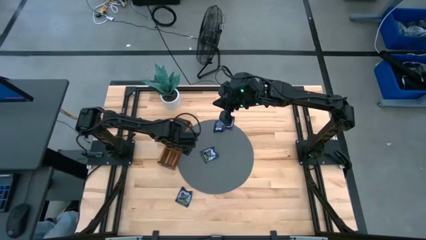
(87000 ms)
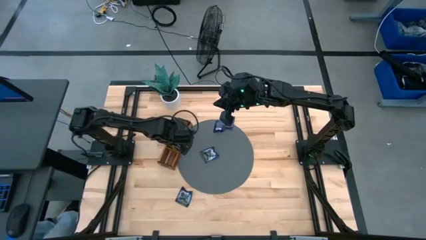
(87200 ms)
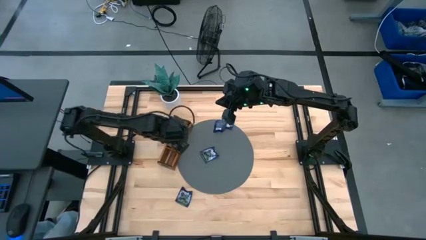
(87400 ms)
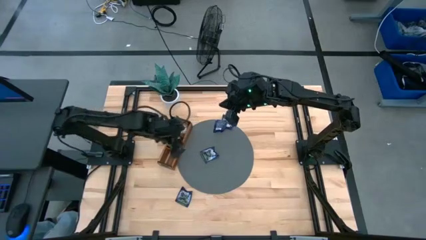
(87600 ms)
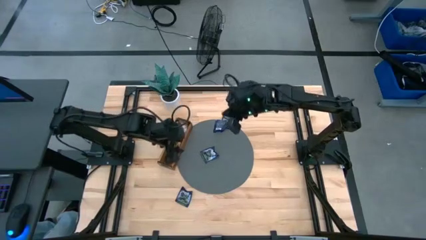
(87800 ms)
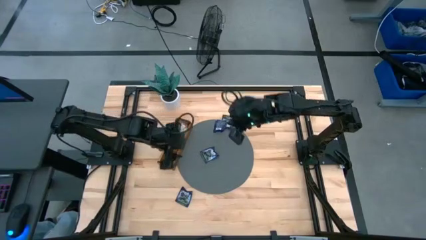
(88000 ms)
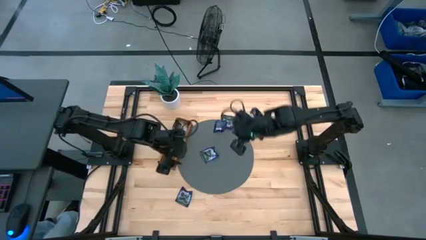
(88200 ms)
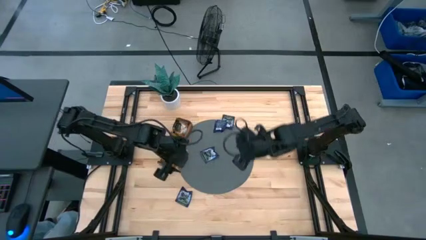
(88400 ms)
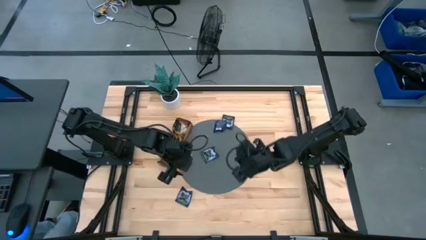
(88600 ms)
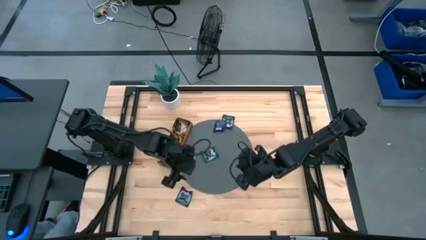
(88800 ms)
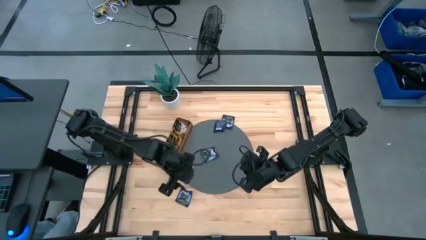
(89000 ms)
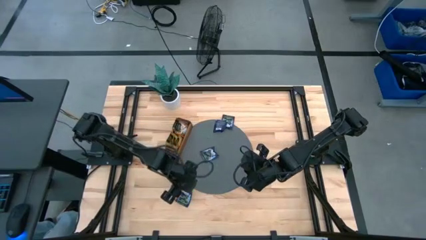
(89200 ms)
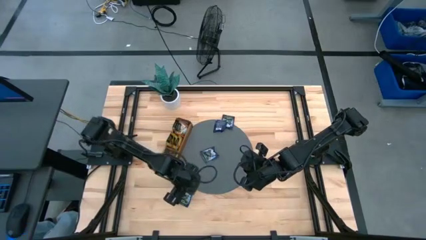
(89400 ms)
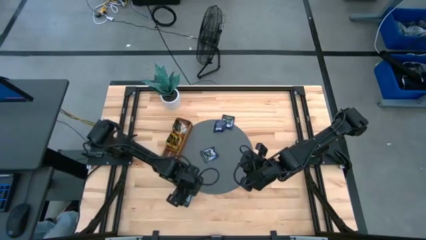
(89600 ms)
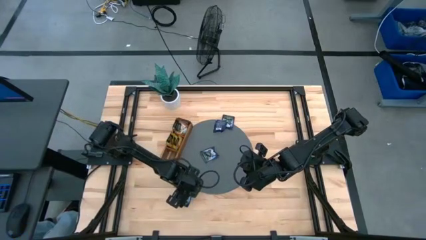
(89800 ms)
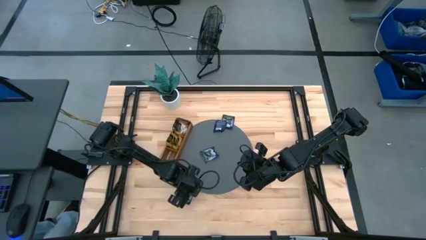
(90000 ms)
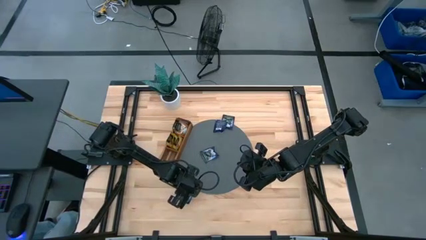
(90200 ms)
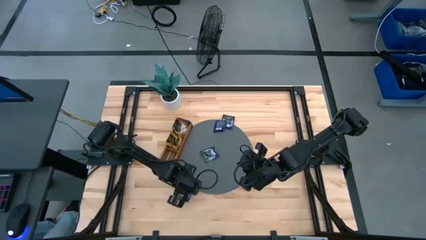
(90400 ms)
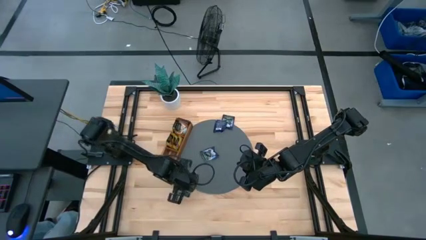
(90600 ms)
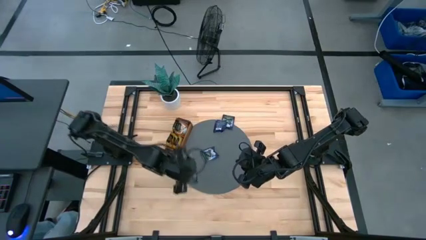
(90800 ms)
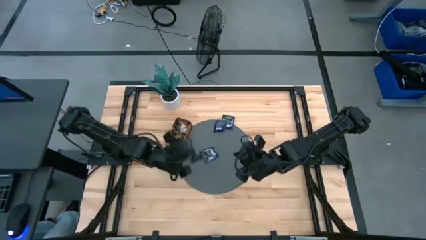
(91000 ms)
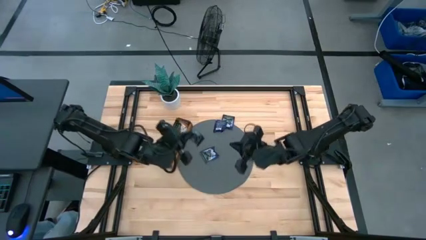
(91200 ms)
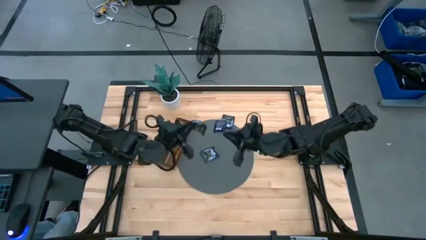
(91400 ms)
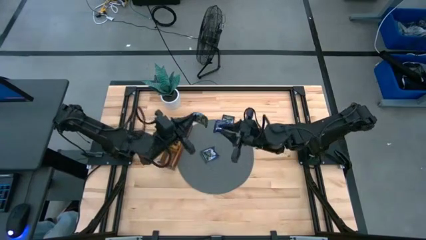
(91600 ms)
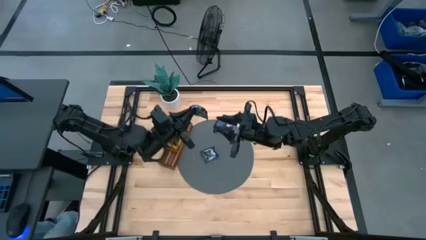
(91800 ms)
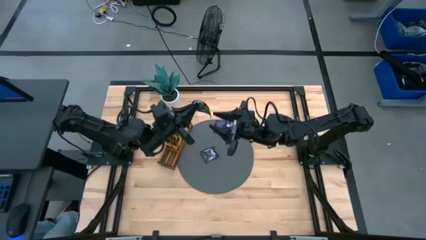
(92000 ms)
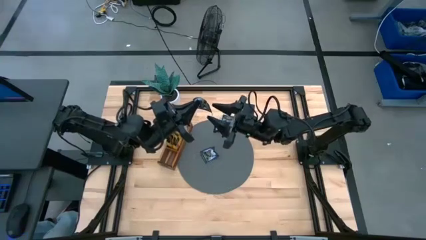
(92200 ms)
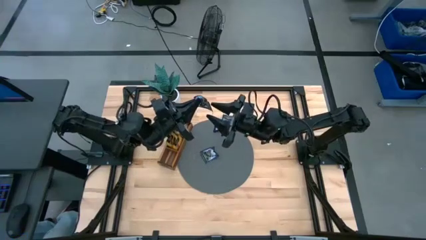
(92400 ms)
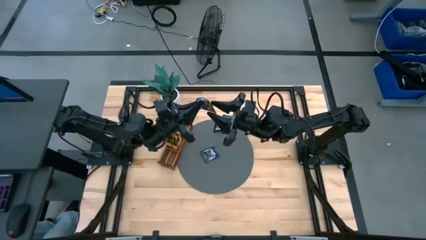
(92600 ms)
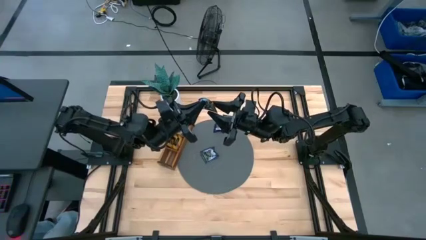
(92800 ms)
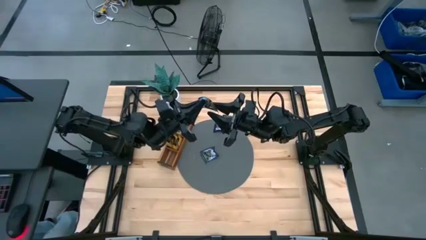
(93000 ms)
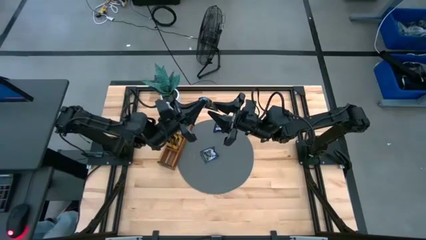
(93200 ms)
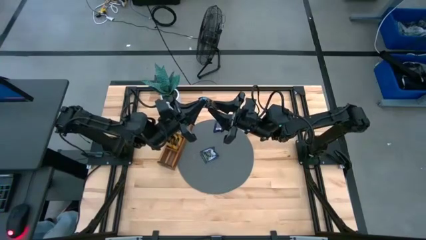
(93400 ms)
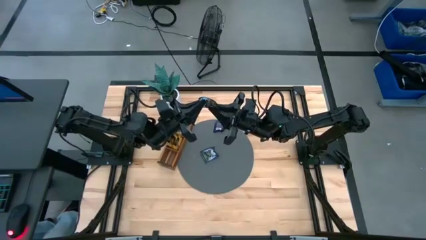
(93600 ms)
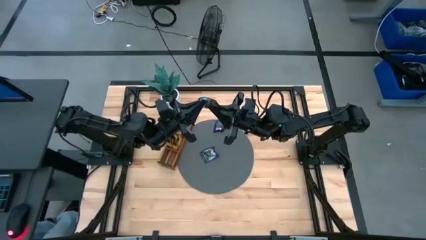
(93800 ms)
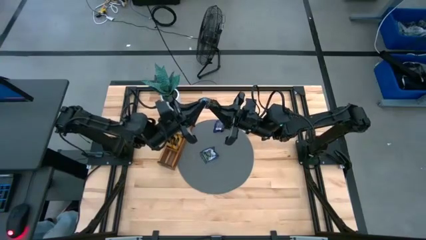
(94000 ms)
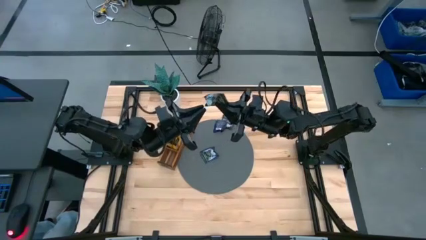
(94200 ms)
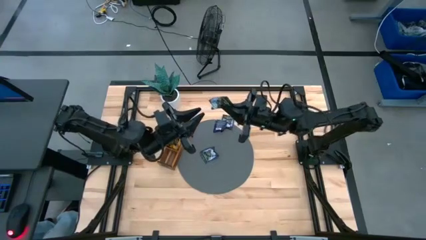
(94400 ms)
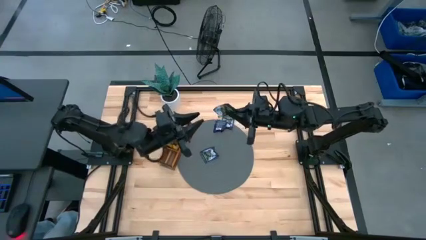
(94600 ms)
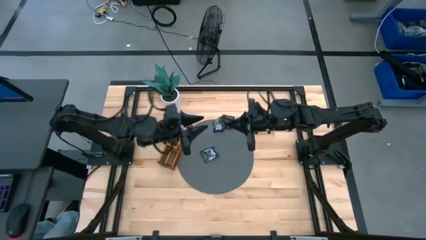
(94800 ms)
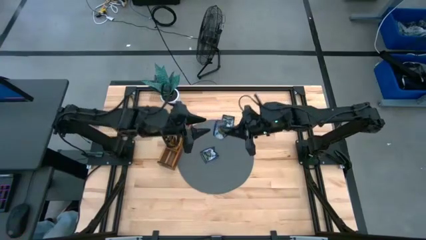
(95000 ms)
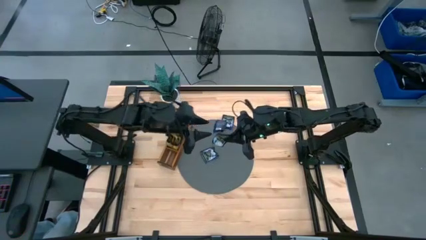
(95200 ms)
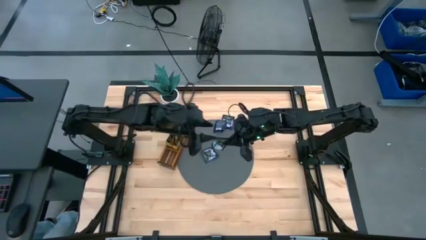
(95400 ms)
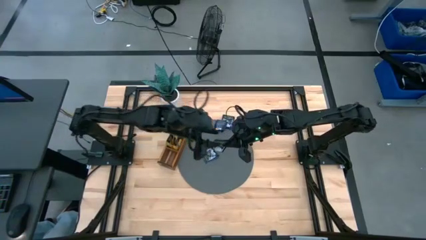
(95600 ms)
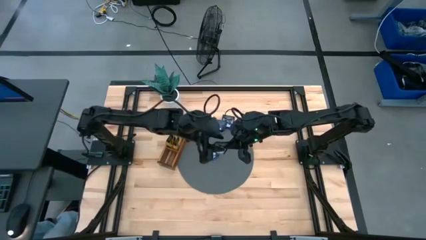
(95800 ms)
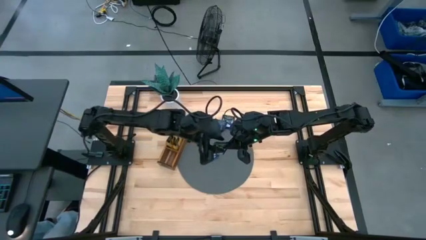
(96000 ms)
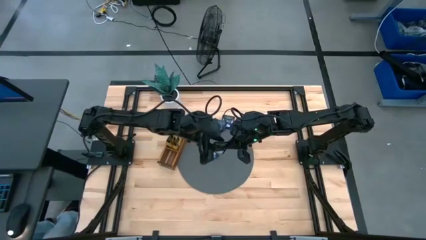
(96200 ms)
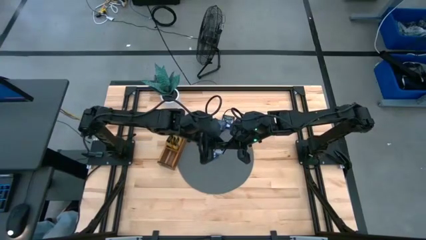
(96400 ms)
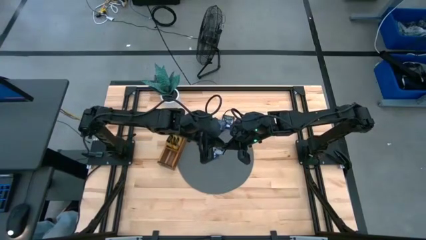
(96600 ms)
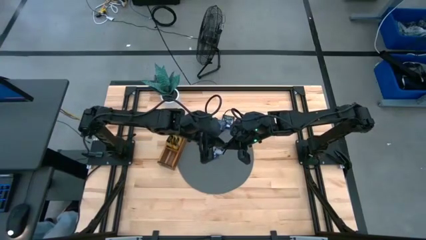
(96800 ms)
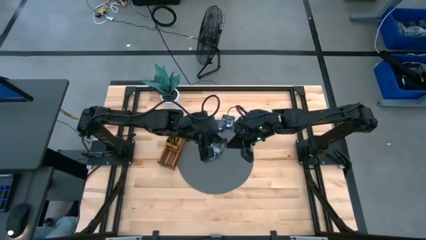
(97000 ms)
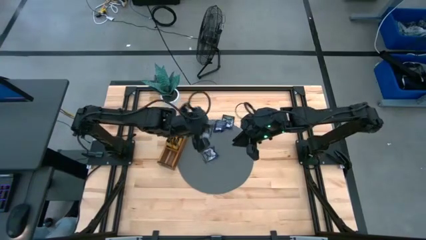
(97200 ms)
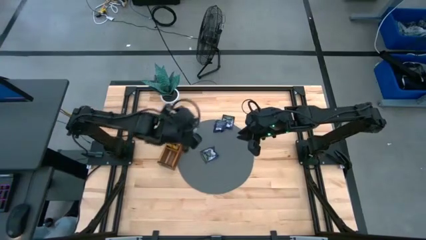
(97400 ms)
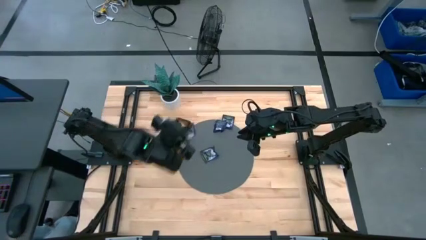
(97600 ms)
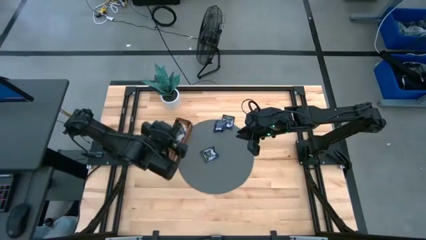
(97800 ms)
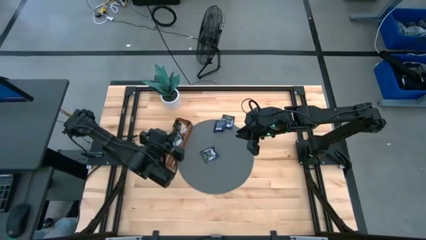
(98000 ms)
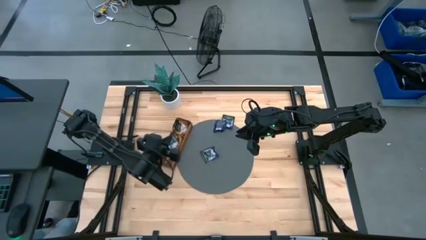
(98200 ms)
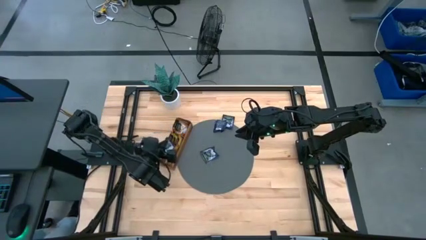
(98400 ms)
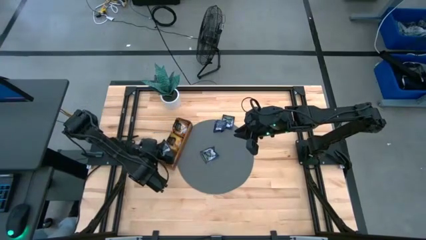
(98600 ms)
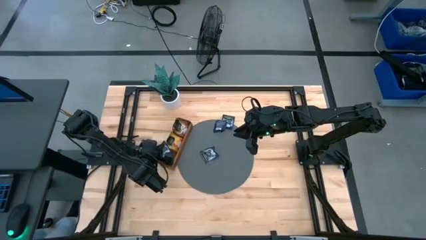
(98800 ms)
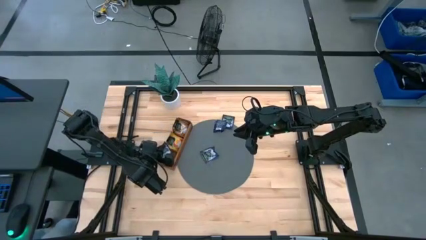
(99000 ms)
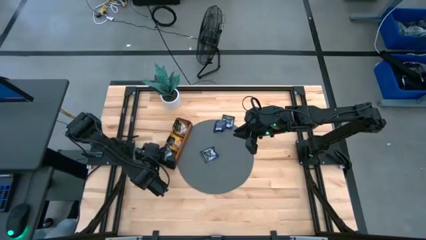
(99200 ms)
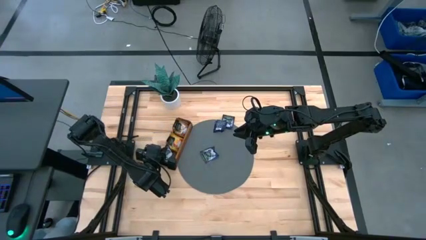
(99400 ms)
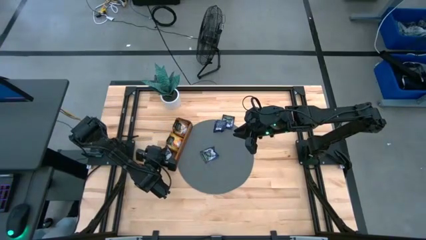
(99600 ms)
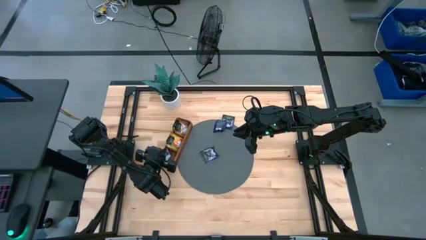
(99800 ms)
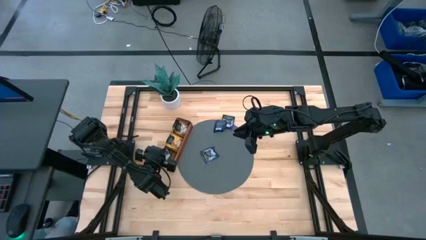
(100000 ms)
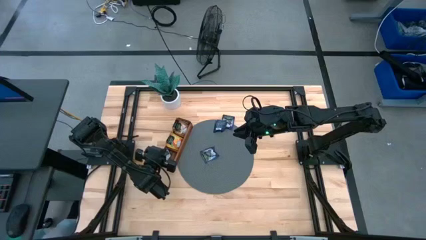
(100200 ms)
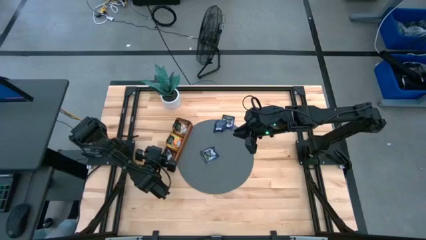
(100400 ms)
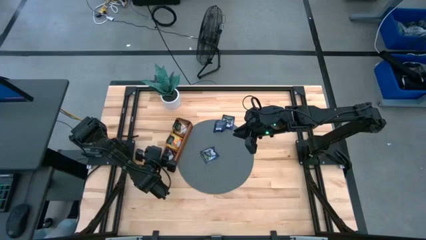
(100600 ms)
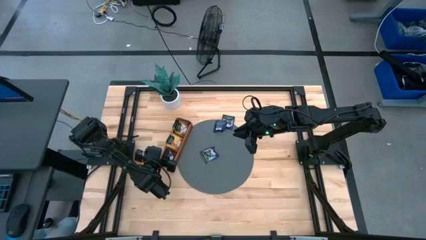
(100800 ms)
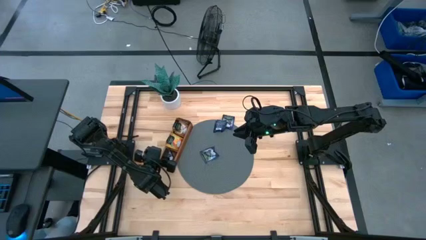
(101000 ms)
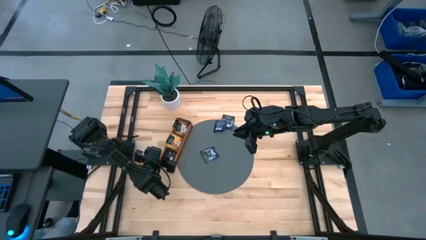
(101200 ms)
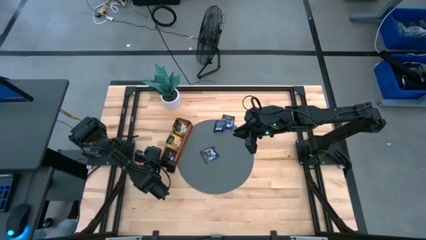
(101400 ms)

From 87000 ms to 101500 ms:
Task: Pick & Place Tea
Put the purple tea bag into the bottom section of the wooden organizer

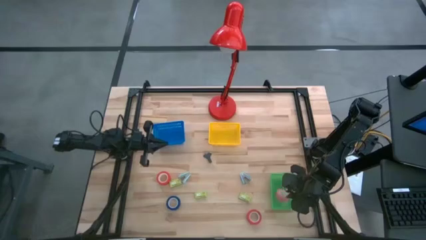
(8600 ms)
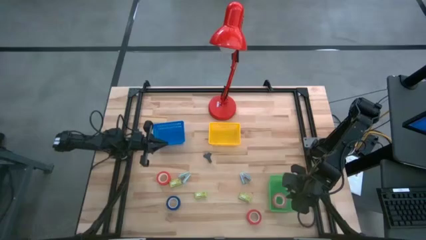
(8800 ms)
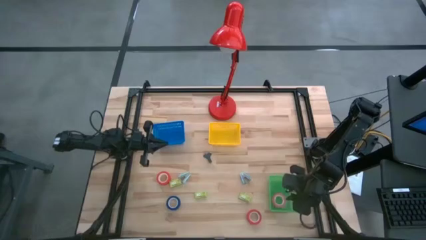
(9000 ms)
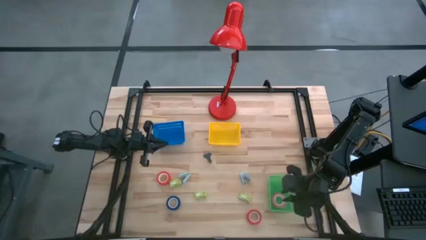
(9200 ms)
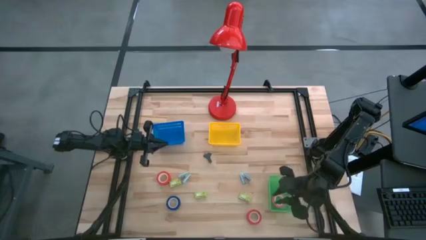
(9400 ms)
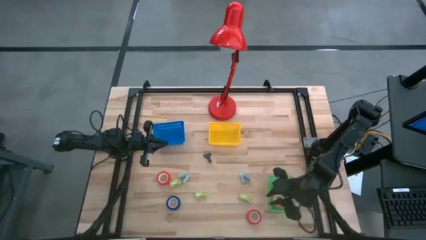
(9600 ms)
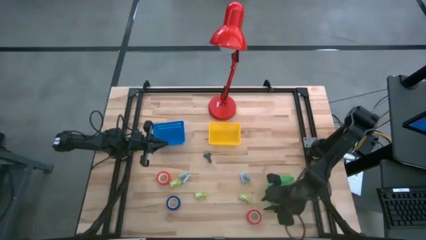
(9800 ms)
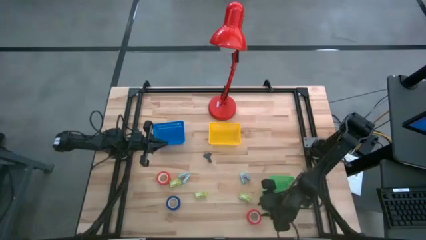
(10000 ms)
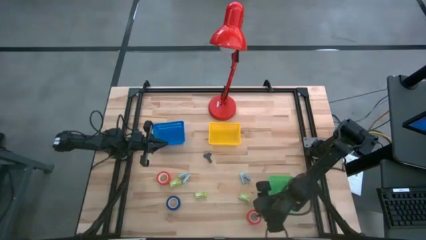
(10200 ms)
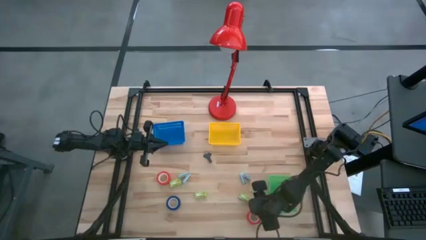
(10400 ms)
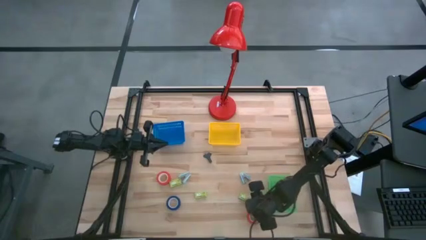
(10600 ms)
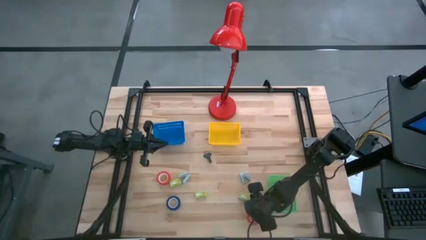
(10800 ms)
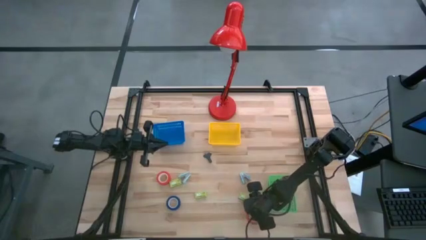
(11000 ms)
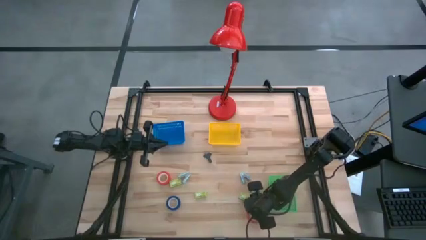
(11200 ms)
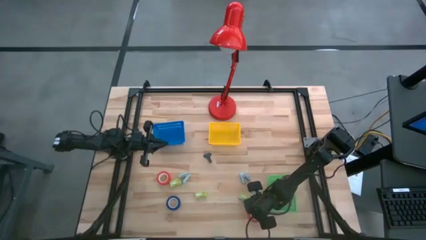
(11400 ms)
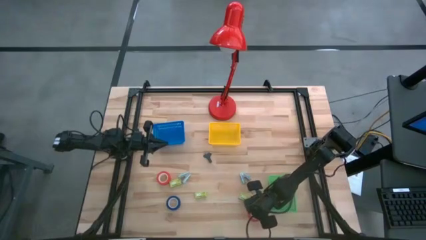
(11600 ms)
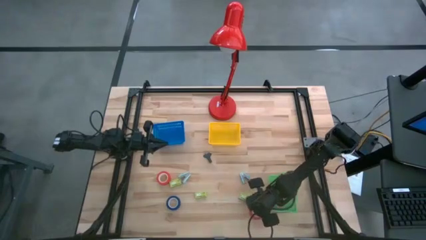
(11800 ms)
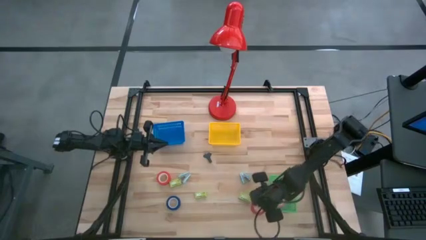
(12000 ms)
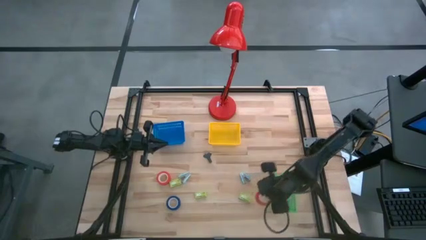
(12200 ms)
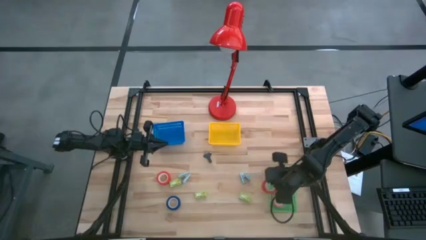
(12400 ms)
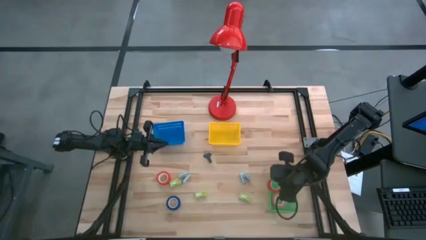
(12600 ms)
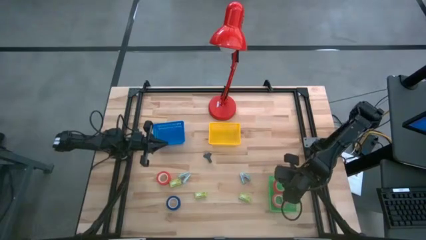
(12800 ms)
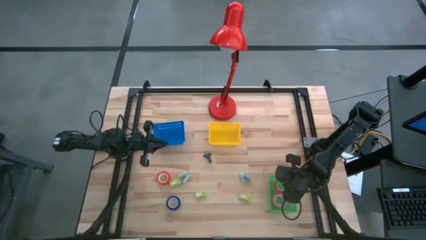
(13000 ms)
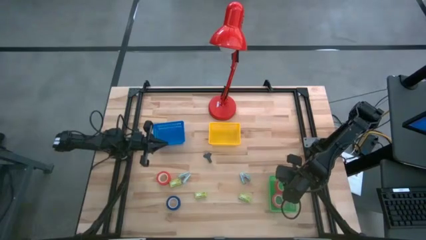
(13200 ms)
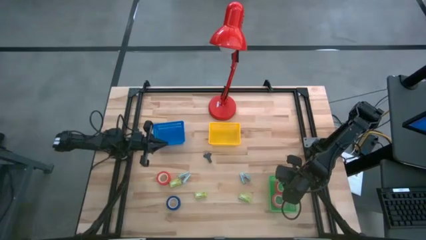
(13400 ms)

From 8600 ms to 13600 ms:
Task: Pick and place Stapler, Stapler remover, tape
Put the bottom red tape into the green bin
